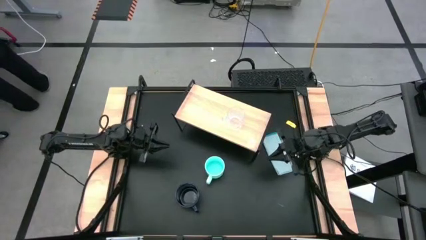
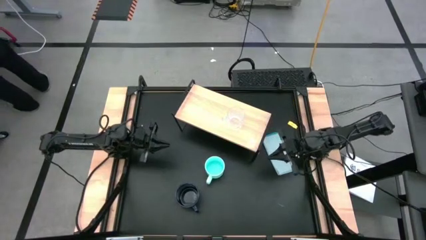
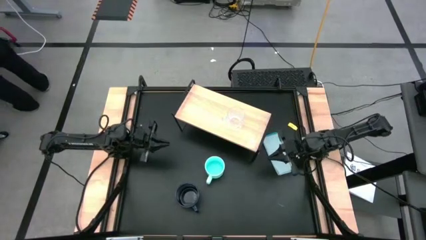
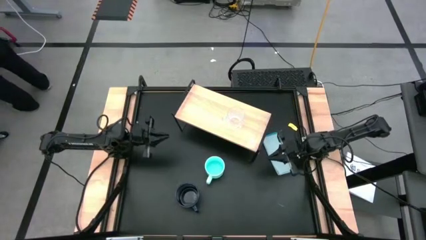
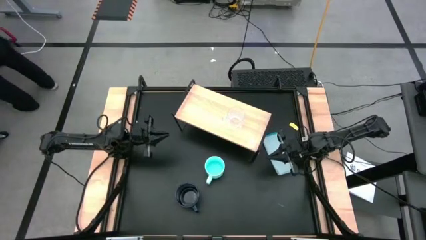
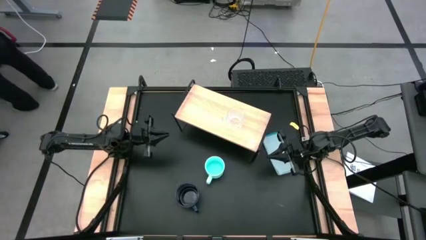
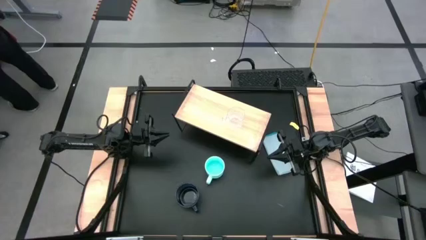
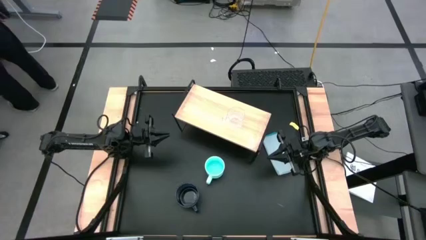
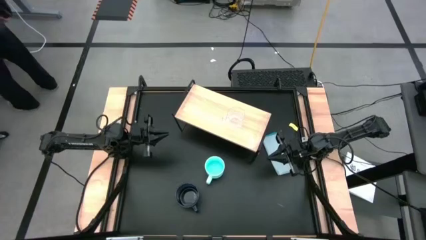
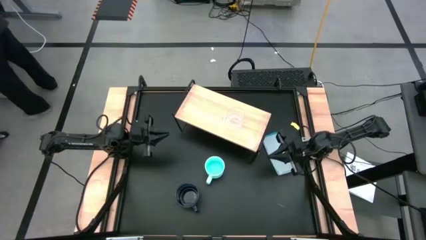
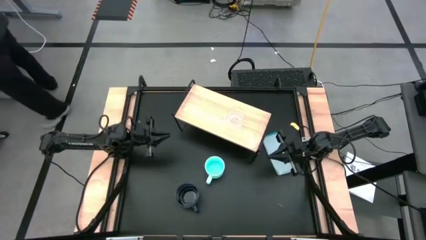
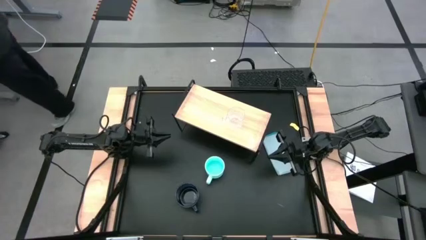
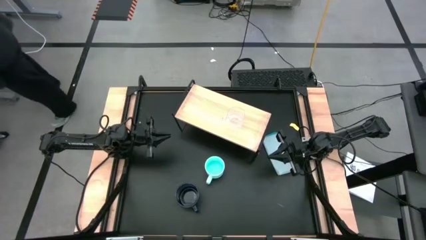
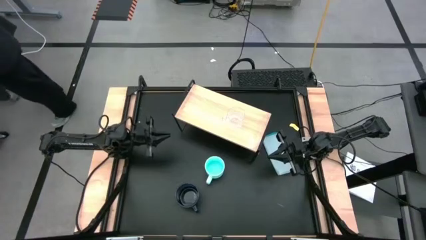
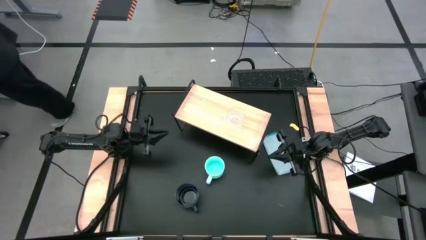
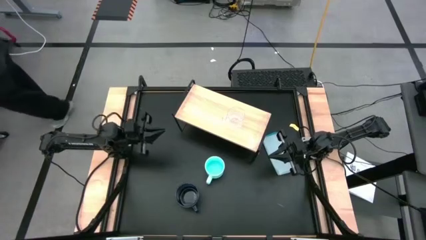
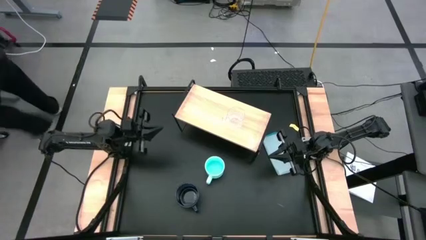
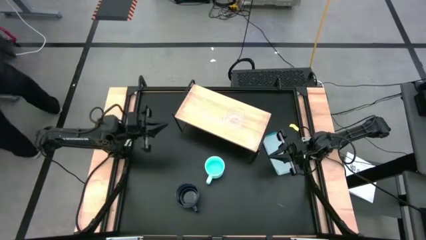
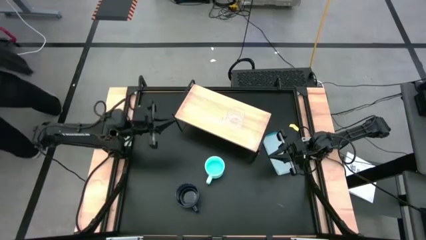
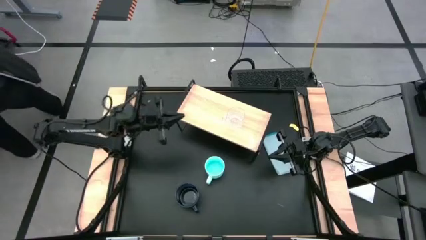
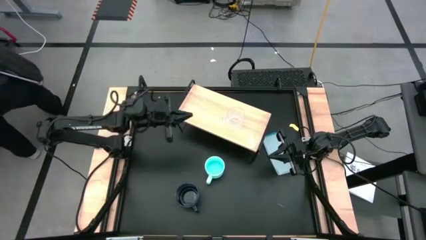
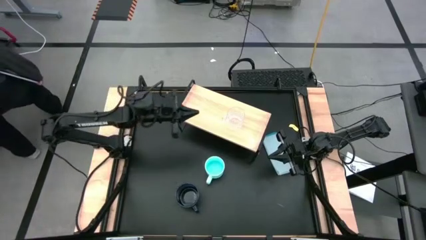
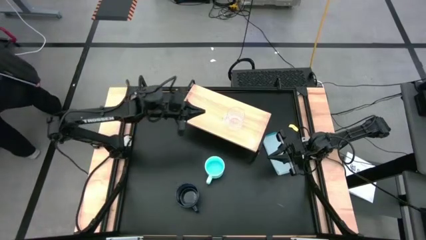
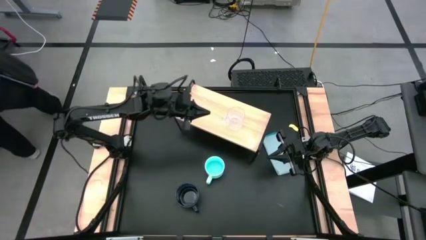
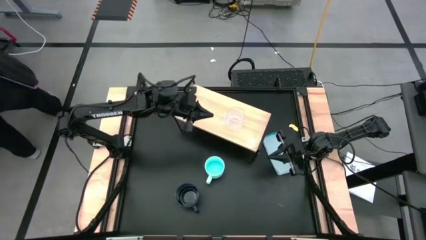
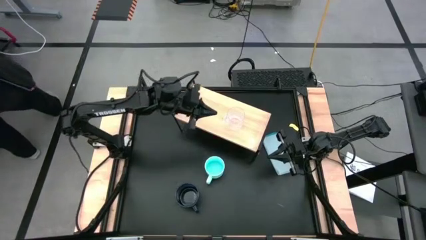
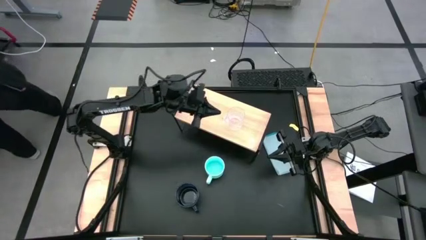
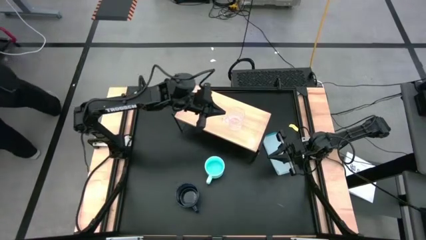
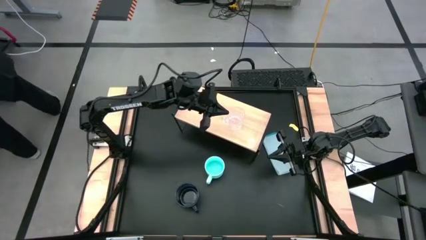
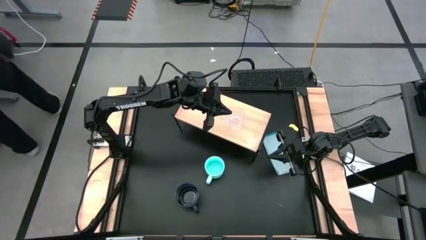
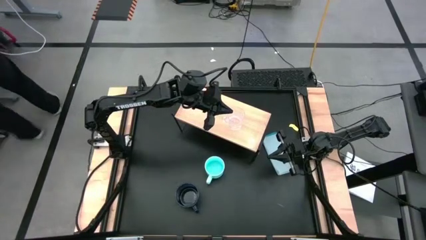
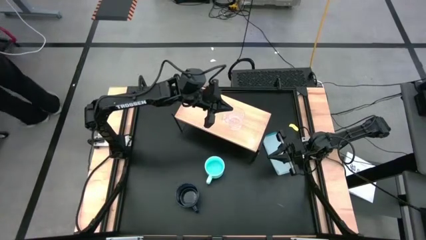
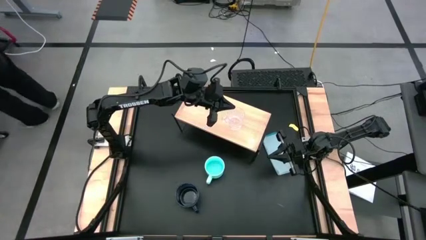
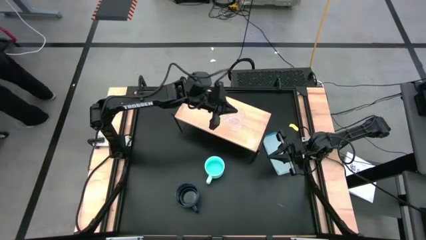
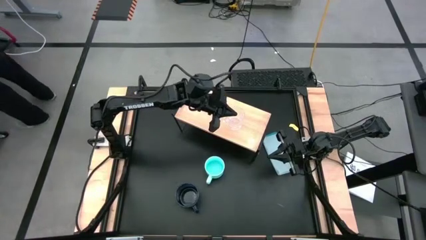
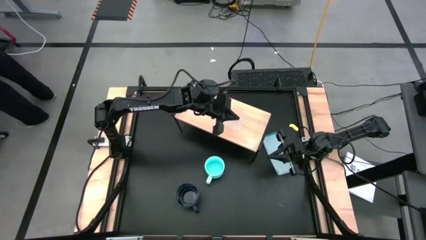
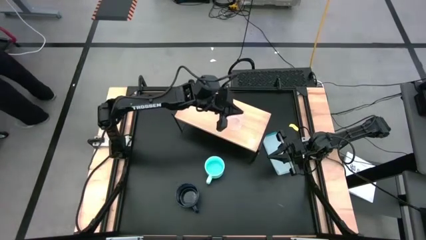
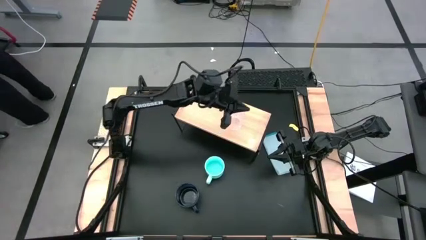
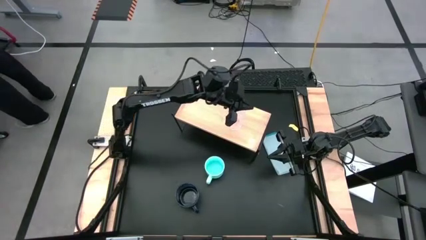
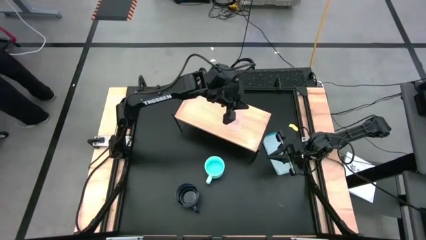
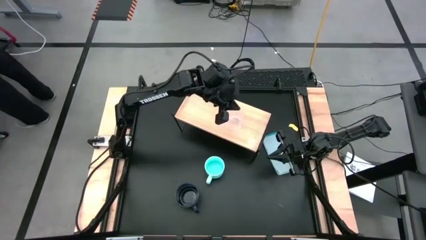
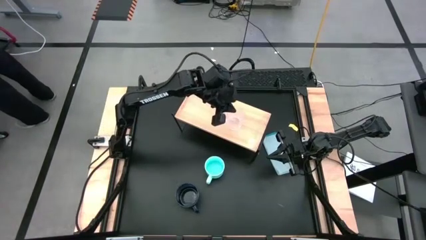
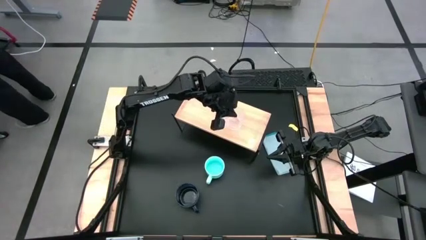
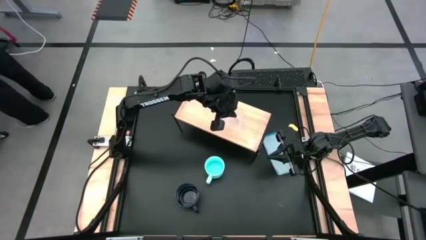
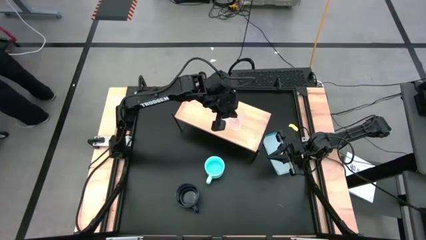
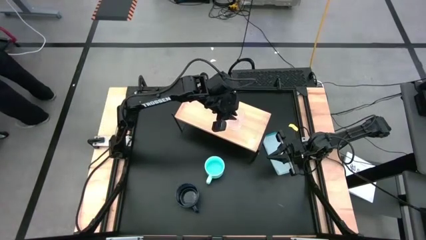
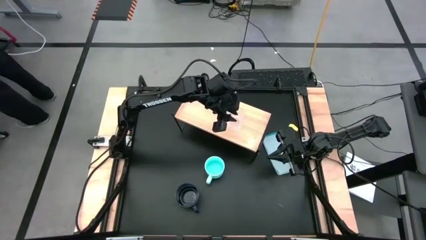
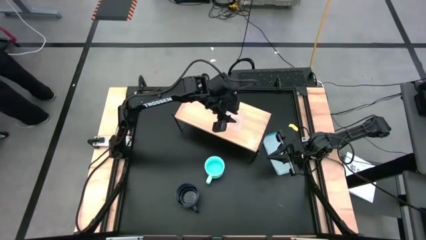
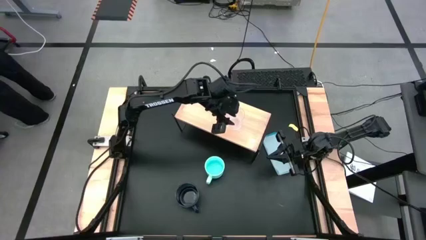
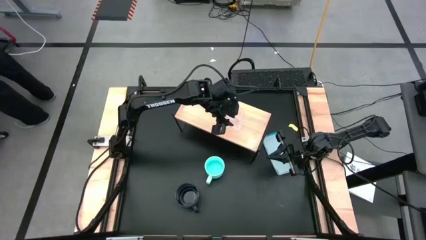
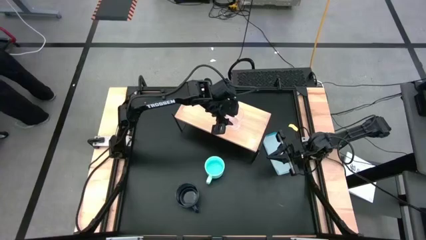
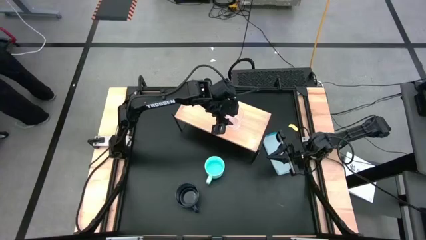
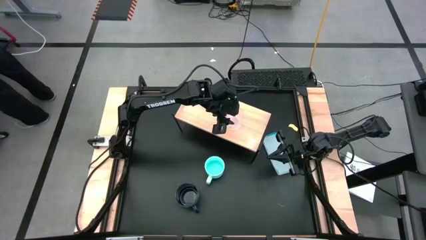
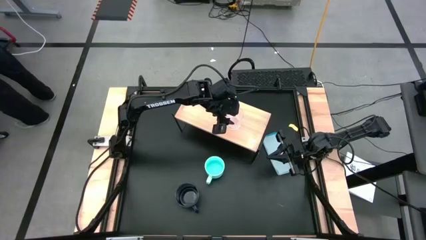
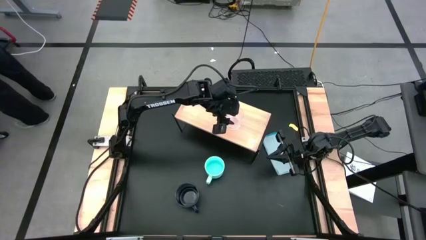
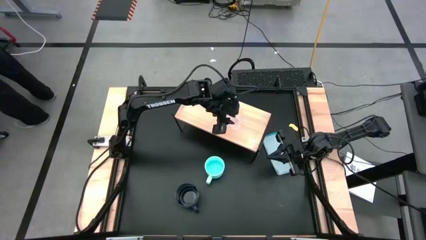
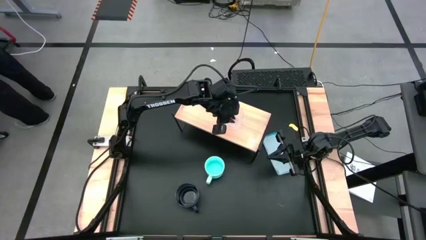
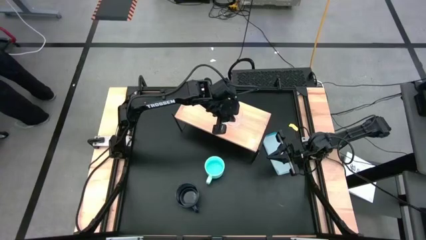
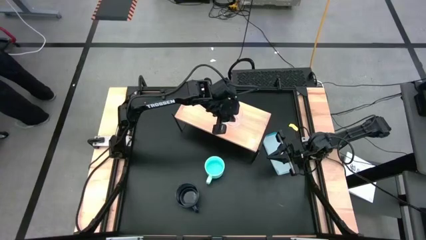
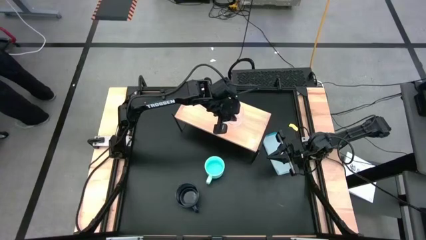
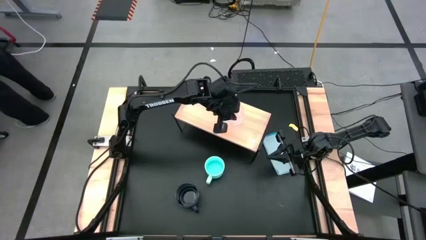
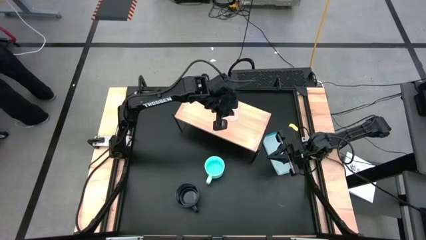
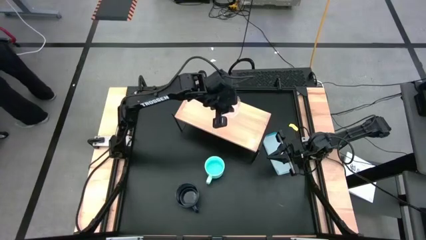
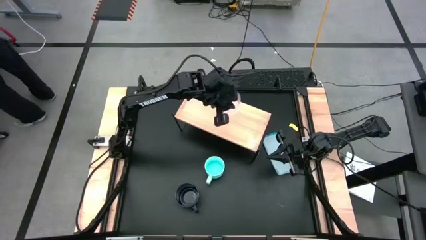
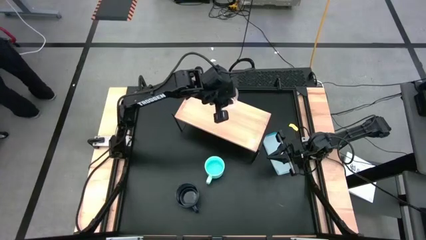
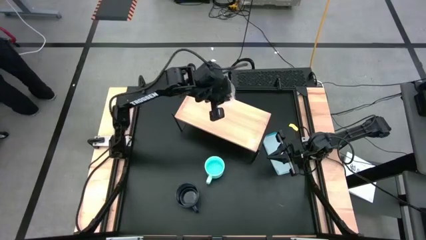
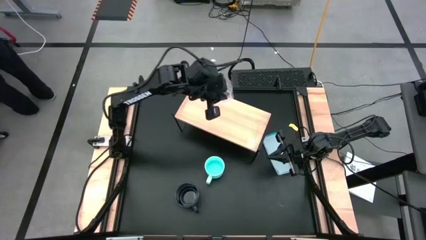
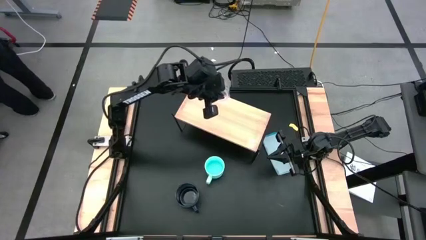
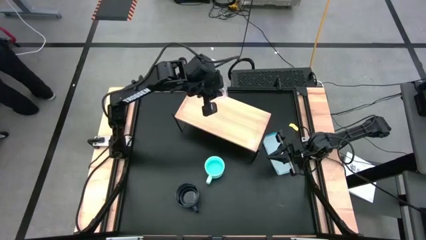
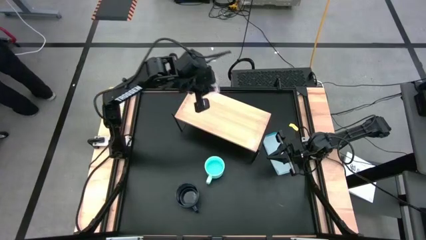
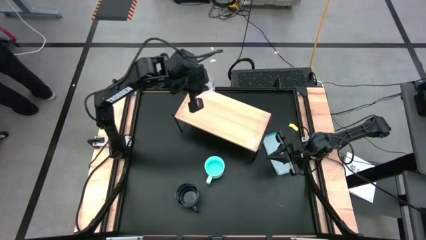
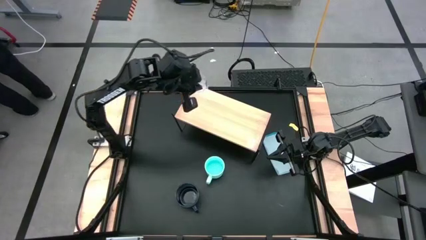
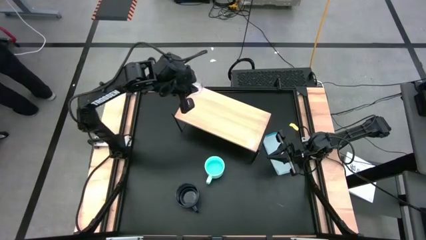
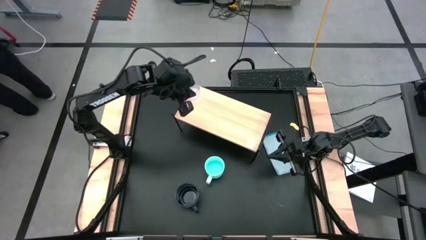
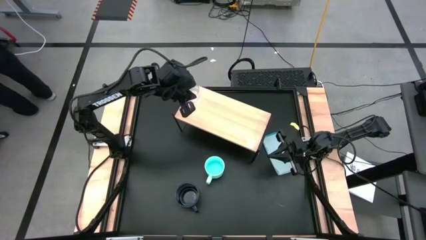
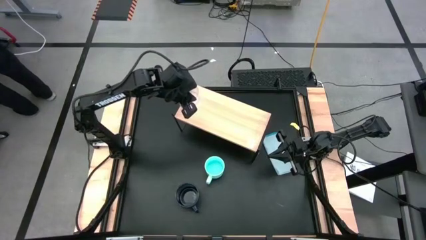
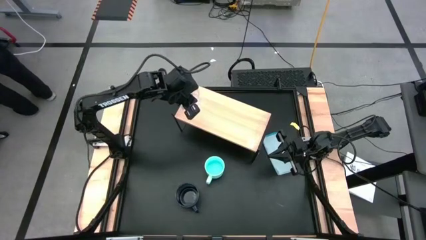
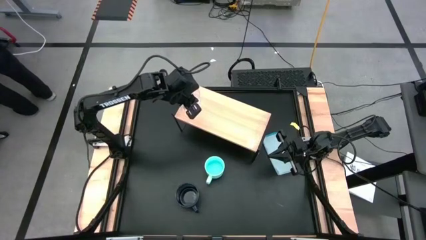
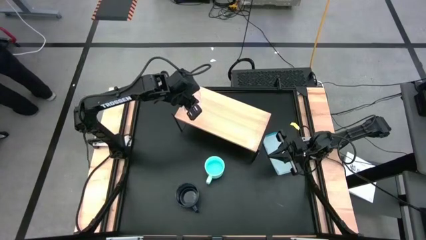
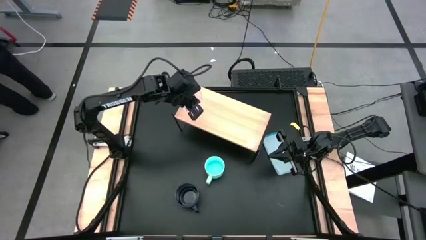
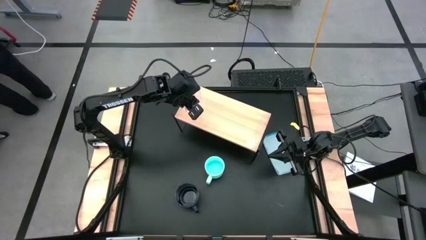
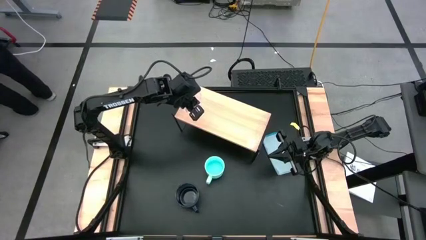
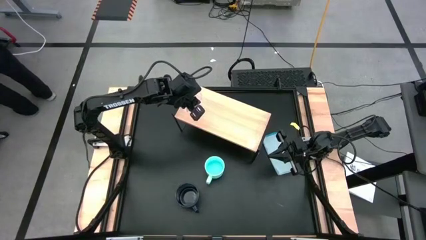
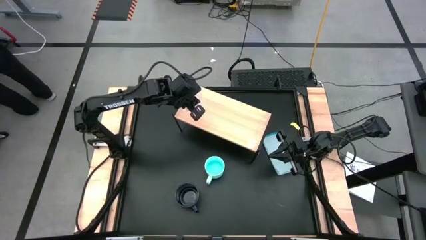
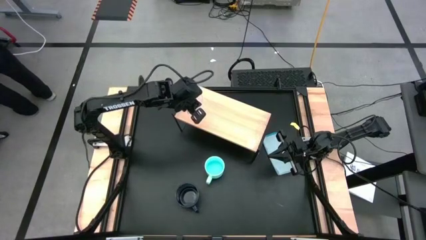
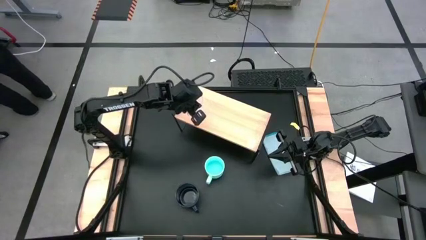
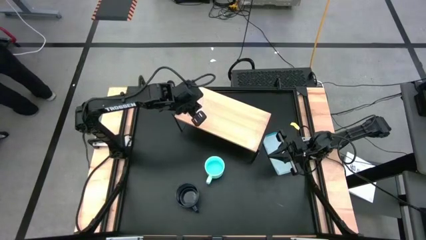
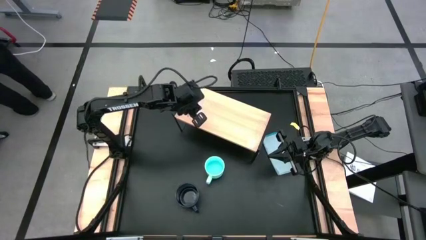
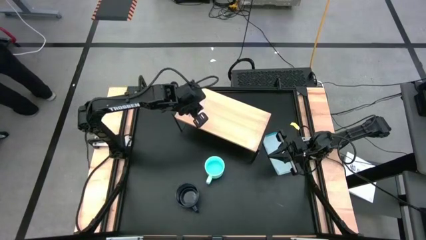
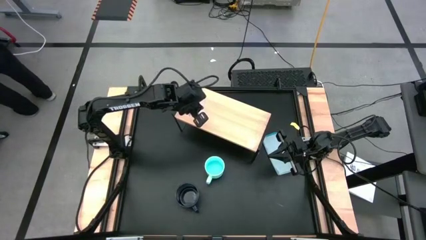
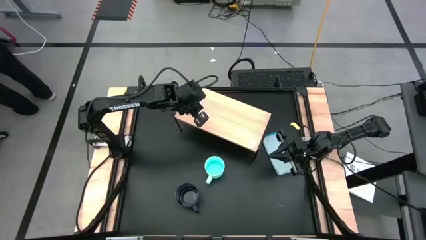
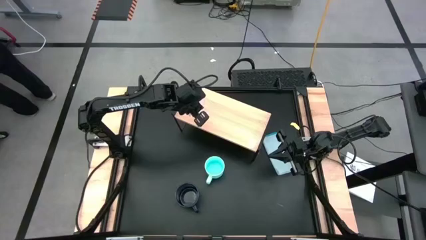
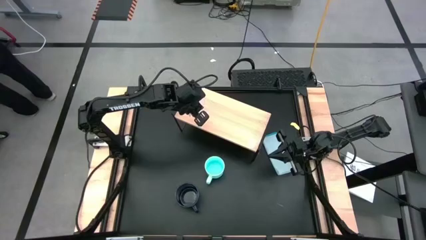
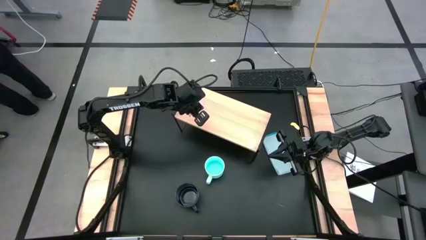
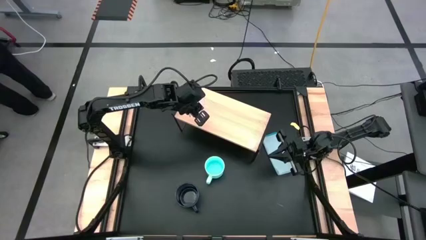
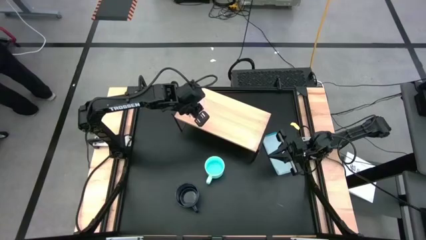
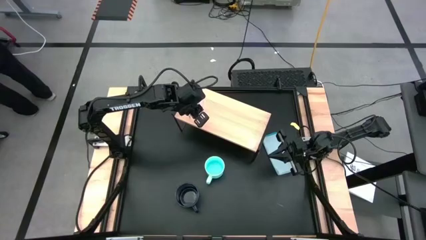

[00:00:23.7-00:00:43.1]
Task: Stack small to large cups/mugs on shelf
Put the transparent mug on the shelf
